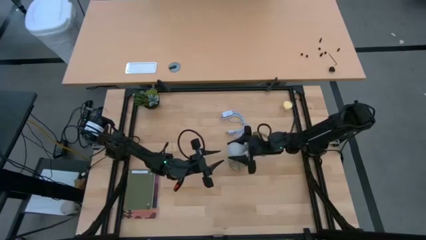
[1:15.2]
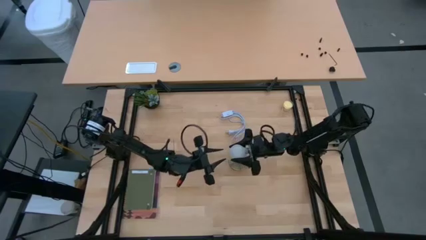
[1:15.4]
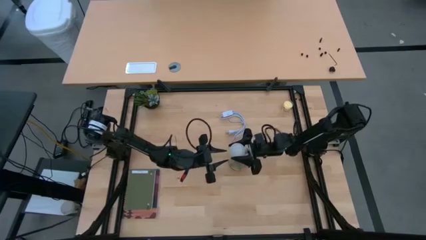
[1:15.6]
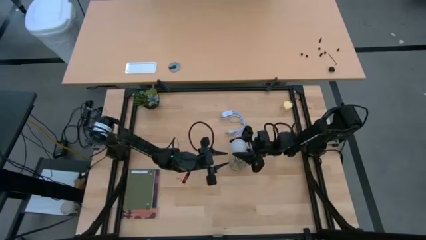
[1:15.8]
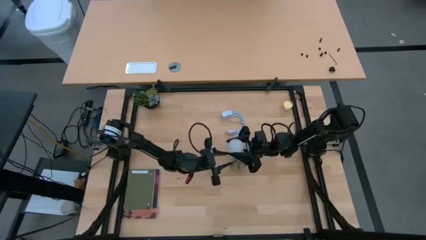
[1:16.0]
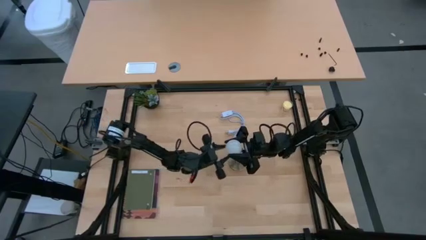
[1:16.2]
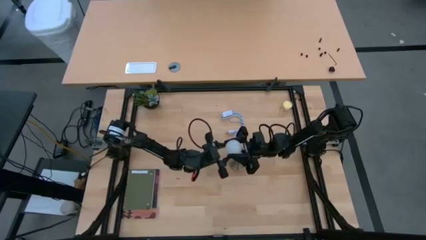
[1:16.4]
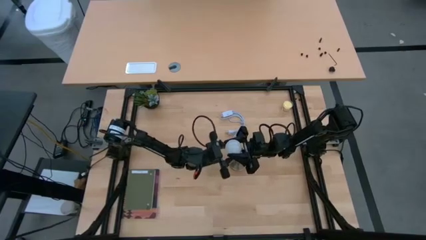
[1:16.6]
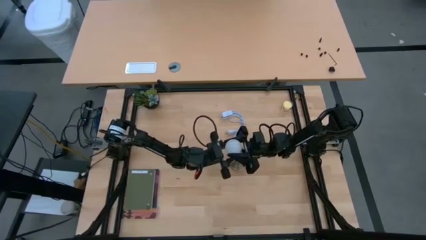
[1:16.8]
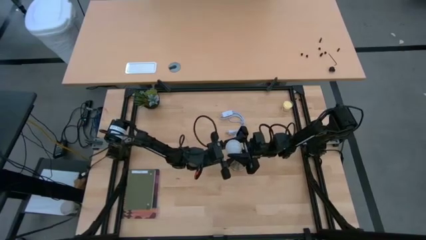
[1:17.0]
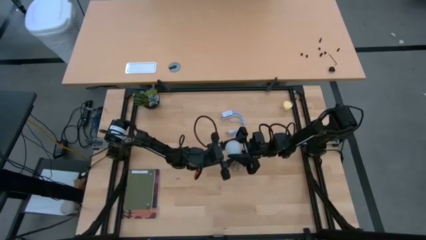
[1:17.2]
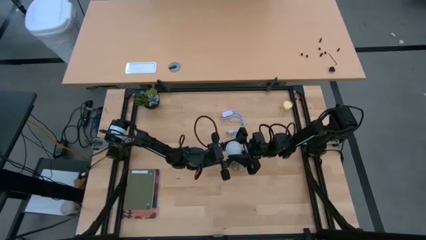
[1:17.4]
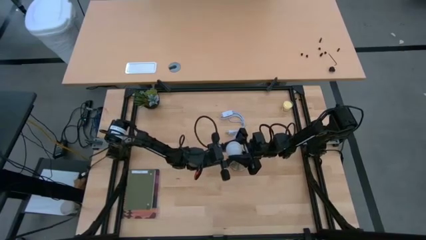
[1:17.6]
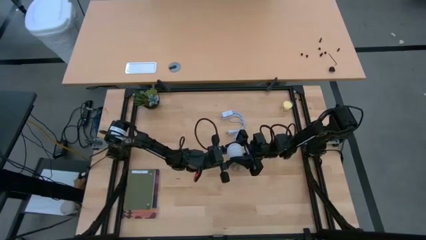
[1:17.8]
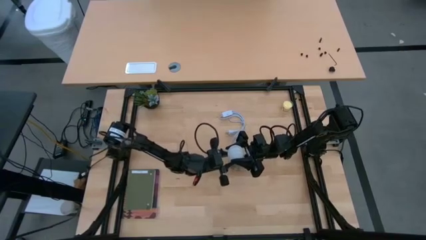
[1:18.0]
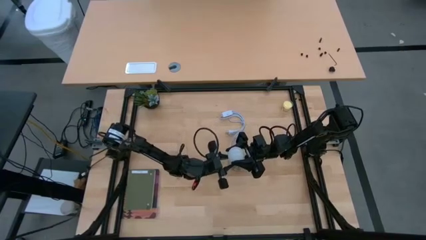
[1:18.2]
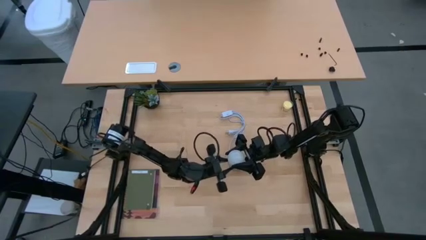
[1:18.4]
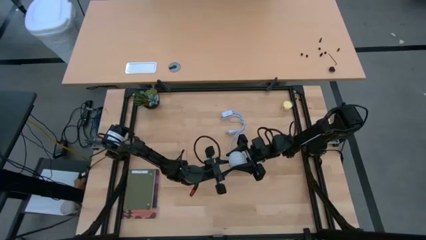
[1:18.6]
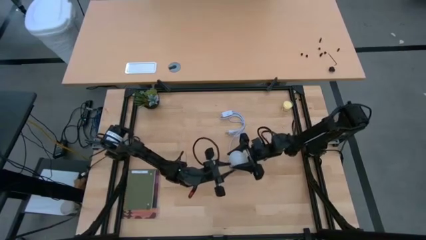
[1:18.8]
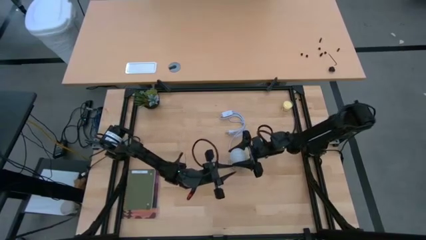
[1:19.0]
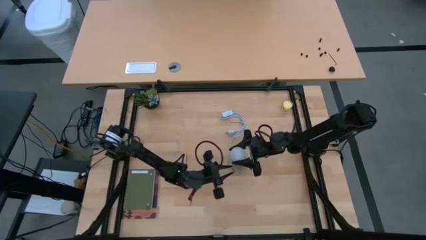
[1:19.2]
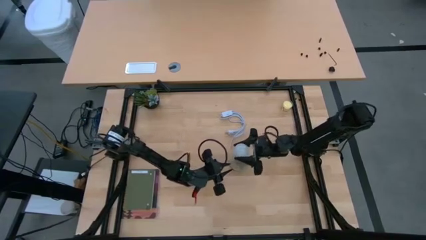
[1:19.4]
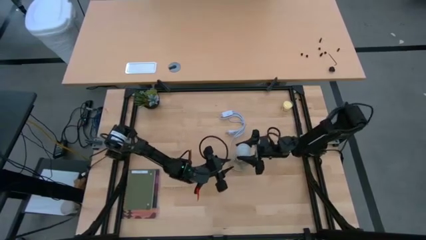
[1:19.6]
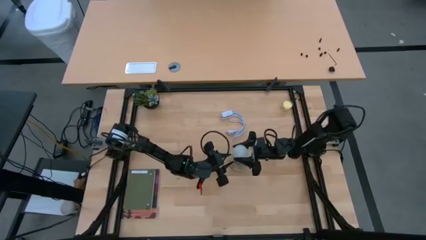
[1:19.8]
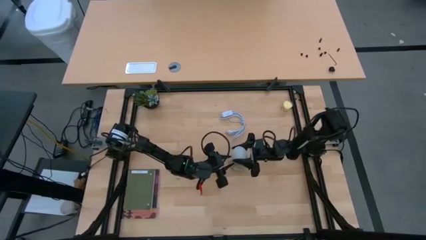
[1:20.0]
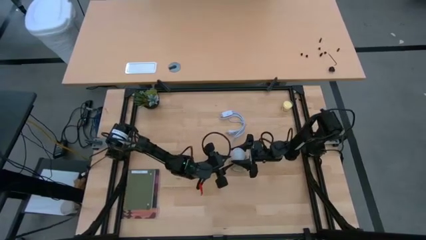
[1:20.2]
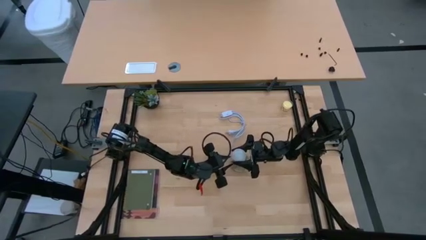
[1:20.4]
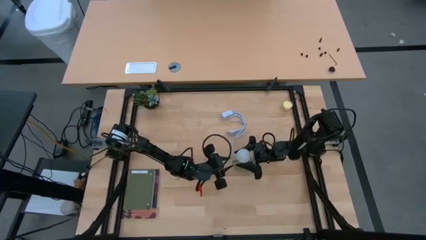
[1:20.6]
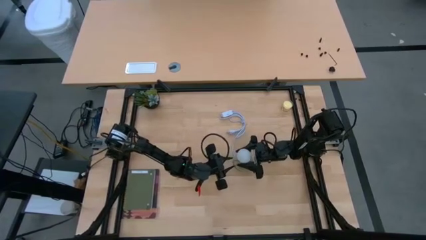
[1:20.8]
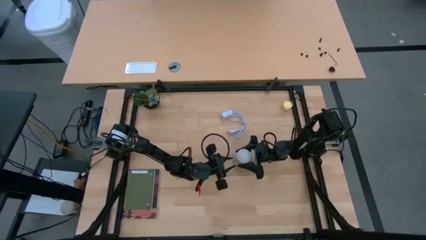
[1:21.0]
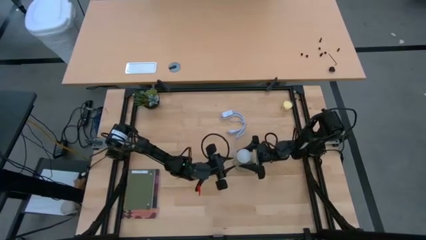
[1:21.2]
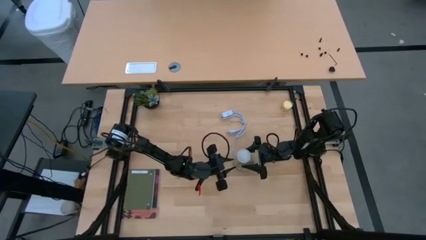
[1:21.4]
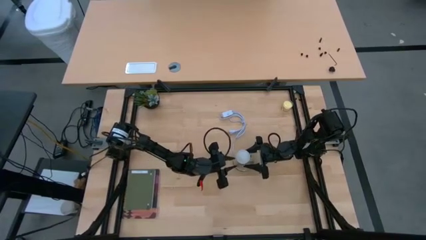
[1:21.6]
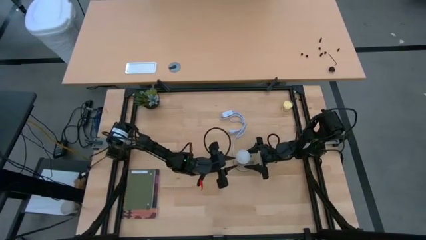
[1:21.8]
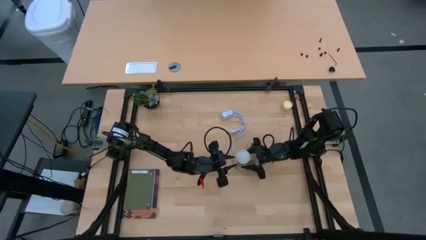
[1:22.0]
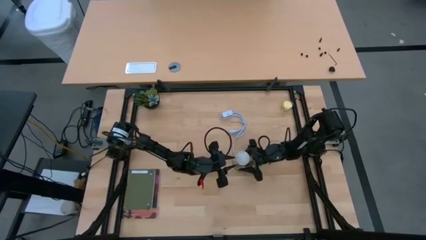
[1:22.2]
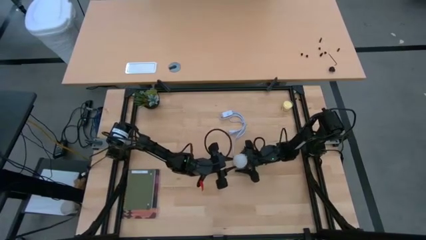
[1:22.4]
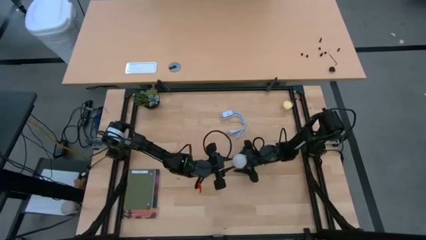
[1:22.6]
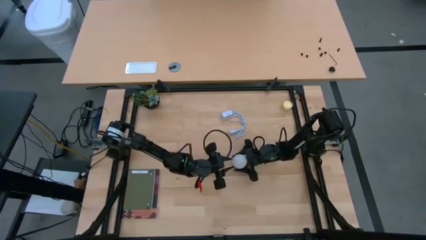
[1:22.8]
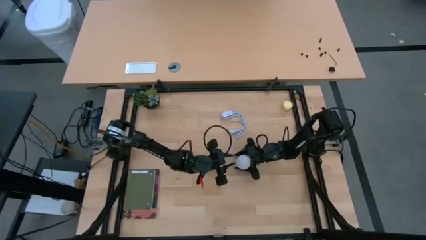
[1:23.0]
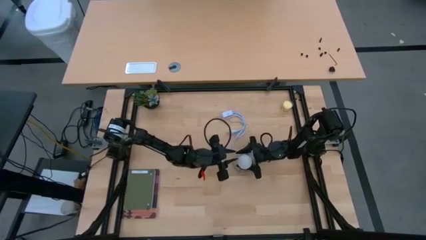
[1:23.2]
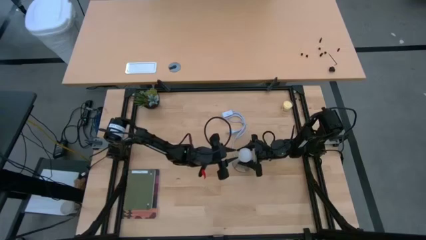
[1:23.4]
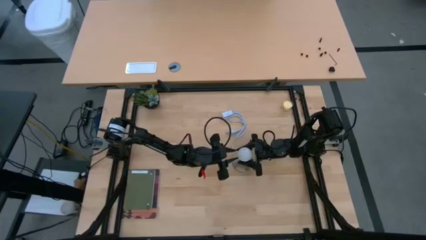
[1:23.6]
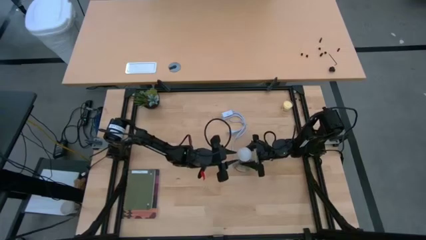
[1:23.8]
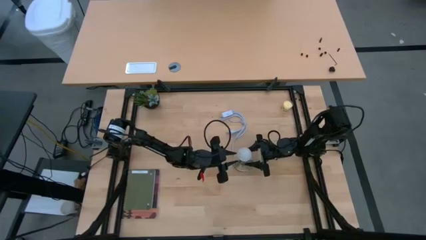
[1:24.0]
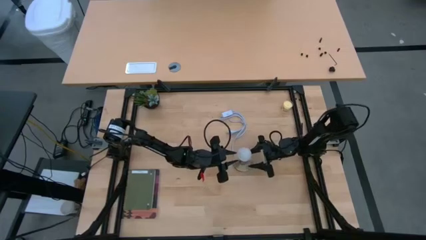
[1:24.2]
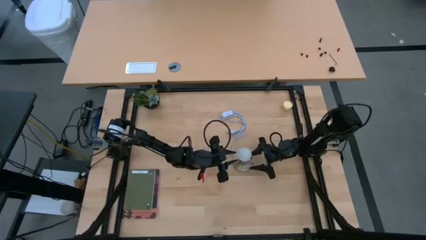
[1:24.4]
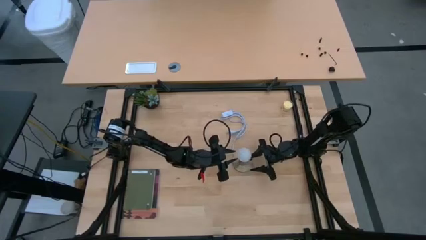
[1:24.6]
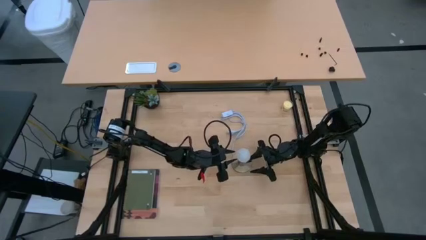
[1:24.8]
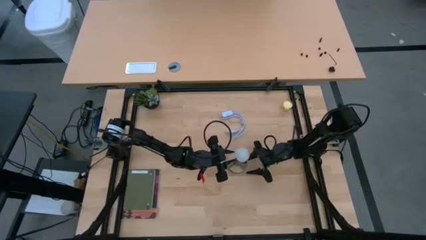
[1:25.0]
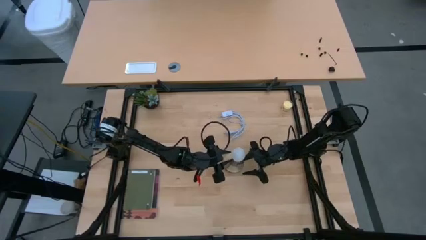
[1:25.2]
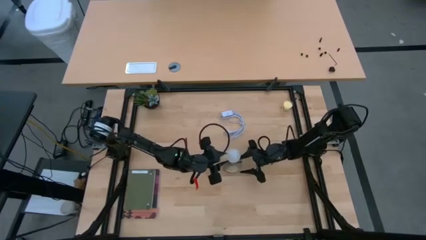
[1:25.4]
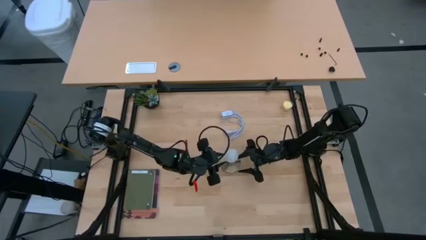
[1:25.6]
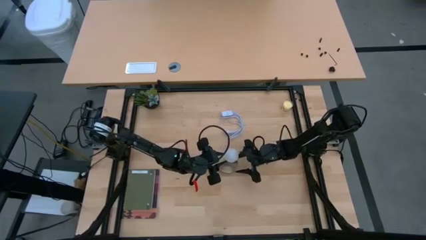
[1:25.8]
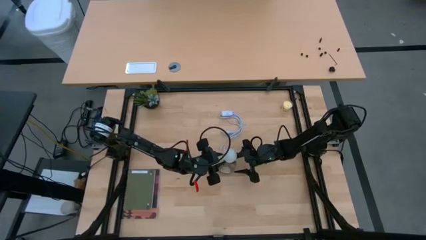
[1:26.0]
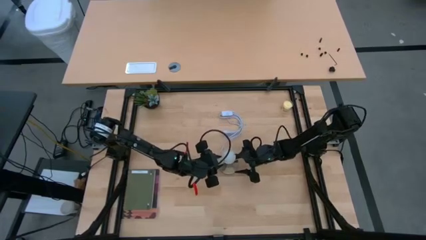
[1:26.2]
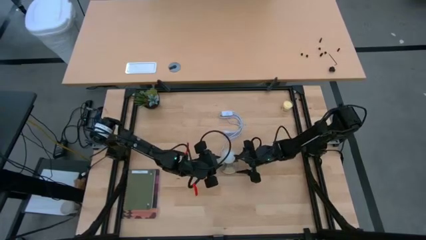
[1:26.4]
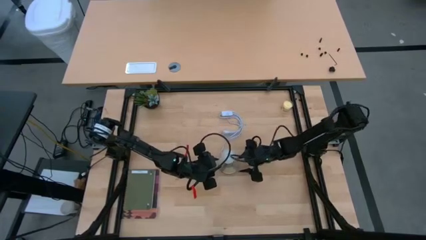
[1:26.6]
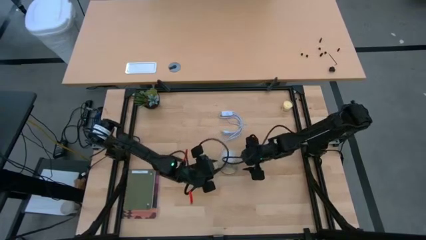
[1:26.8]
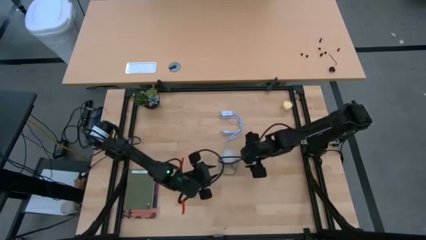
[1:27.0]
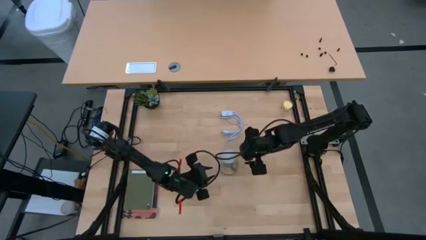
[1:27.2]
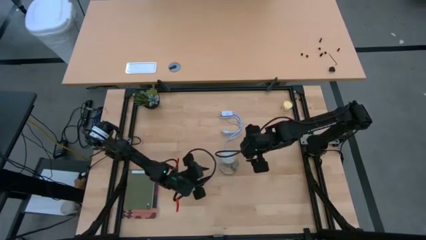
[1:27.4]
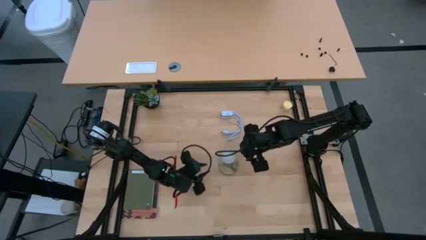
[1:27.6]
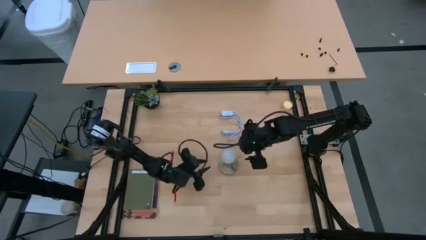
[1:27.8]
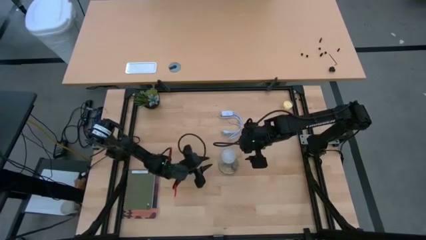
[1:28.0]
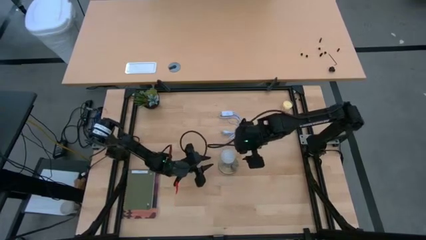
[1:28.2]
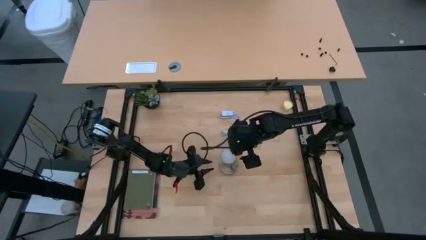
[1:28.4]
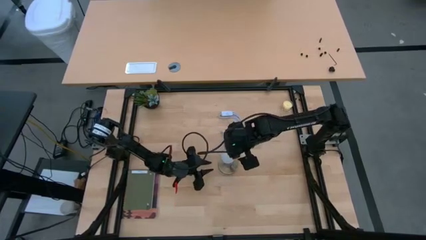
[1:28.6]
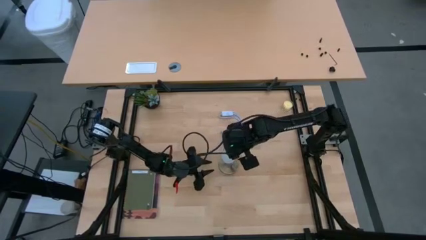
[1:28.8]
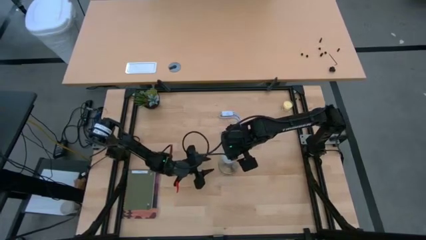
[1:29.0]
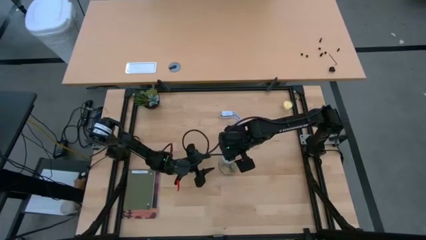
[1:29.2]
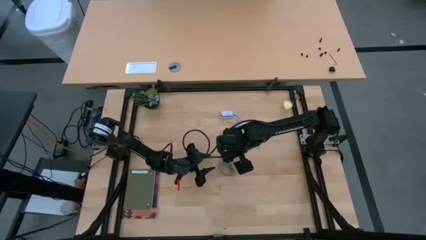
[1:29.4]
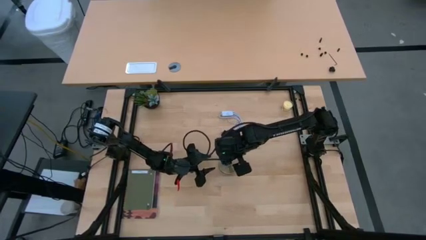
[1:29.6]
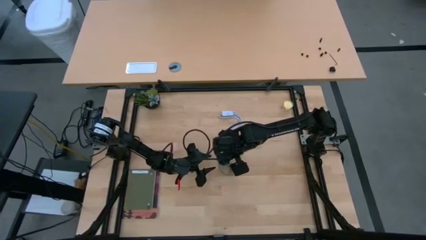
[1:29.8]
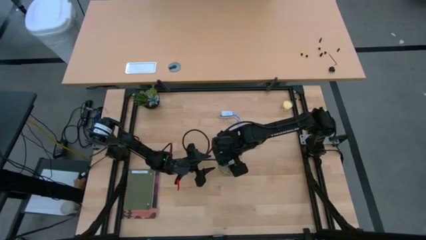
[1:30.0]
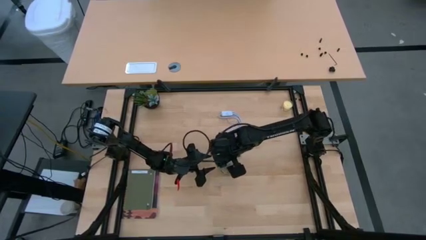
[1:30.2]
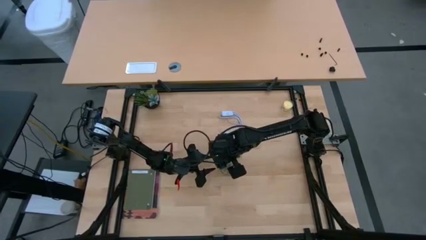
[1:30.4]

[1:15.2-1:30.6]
Task: Screw lightbulb
Insert the lightbulb into the lamp

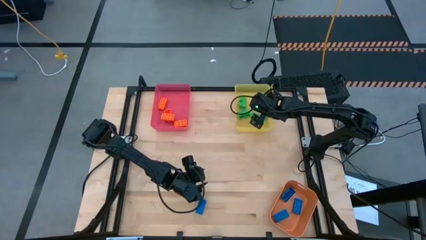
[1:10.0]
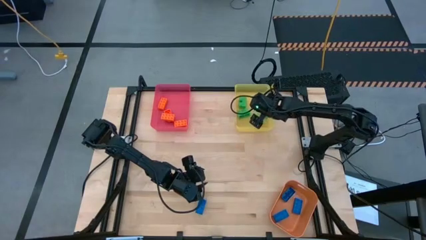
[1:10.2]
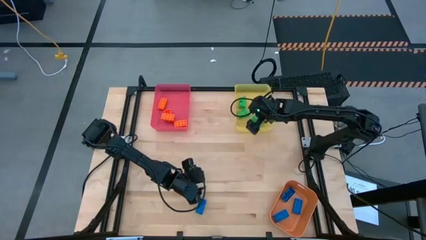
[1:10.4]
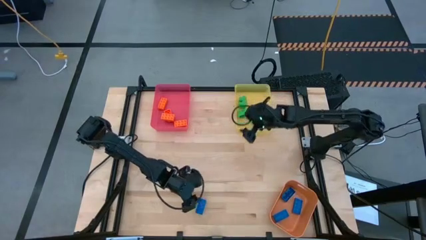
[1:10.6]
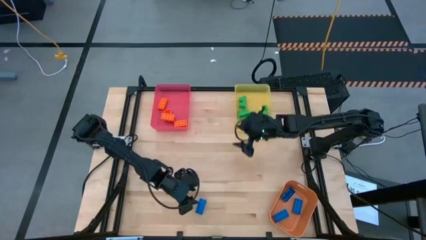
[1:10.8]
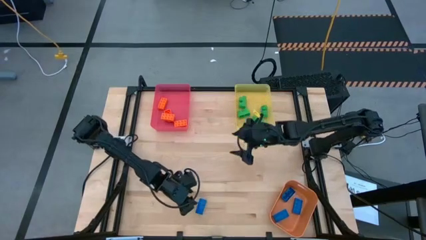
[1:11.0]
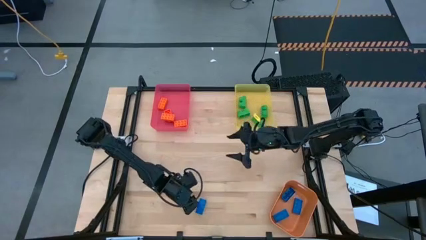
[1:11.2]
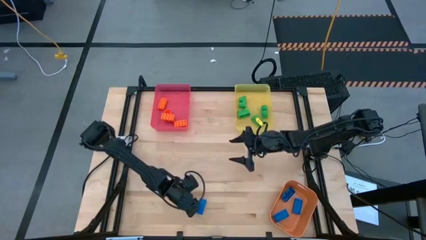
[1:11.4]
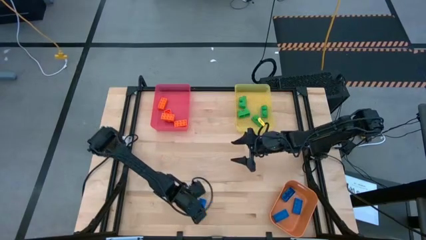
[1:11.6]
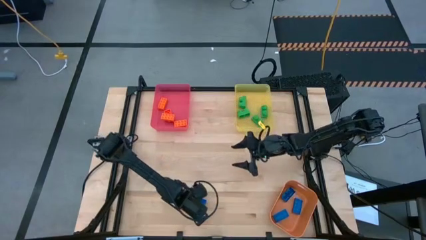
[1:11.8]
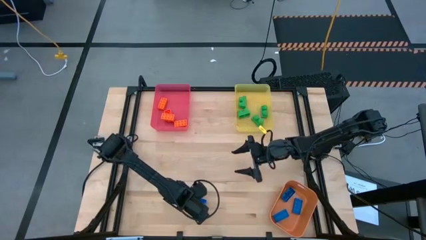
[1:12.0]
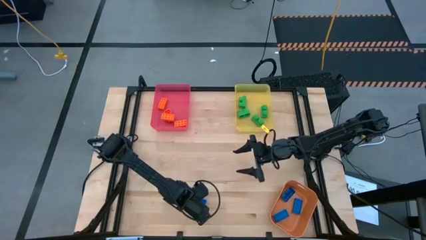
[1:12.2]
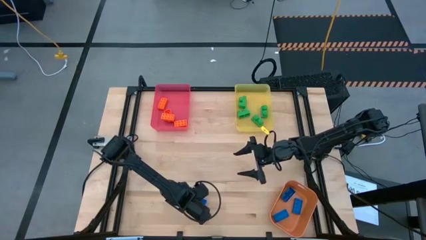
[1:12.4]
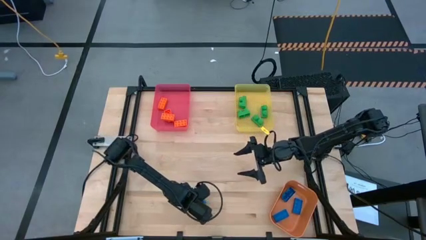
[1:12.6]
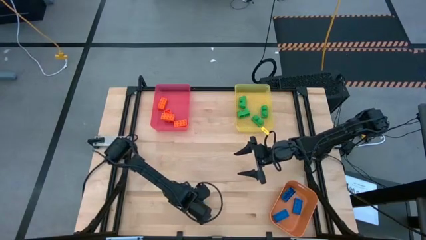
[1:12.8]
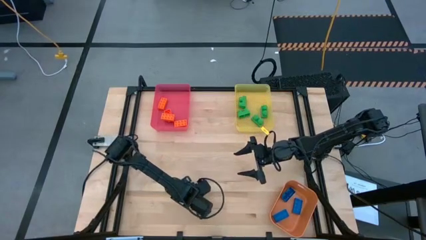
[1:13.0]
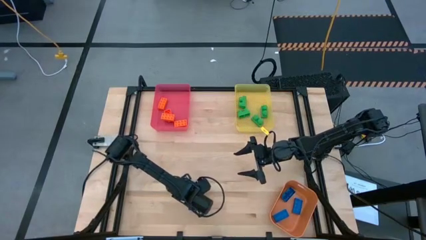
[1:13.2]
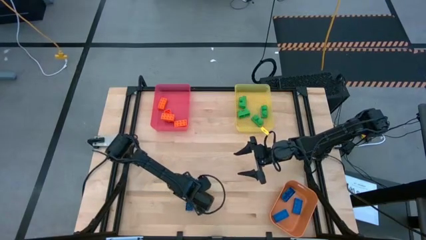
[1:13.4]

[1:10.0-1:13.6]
Task: Sort & place blocks by color
Put the blue game piece into the orange bin
